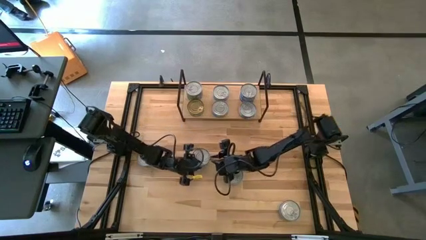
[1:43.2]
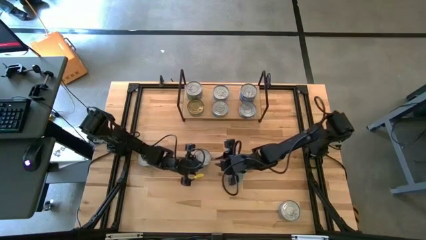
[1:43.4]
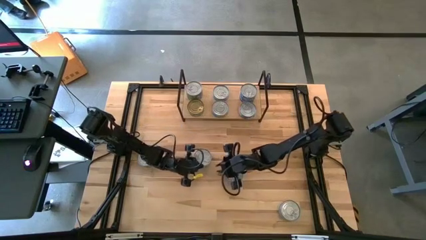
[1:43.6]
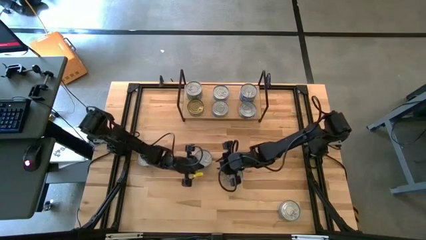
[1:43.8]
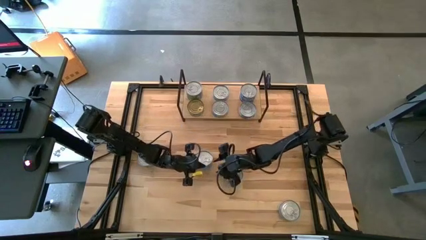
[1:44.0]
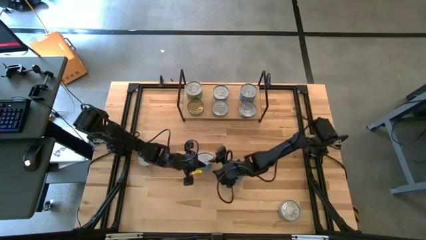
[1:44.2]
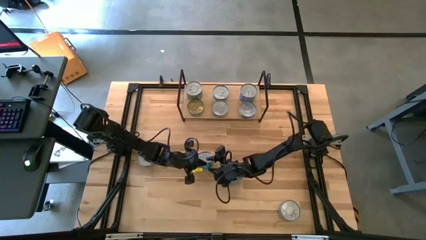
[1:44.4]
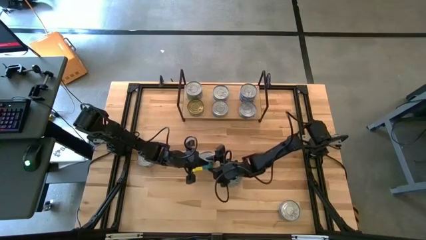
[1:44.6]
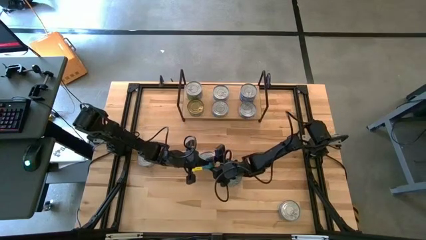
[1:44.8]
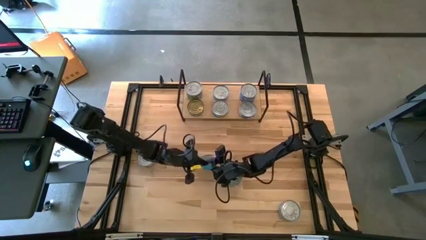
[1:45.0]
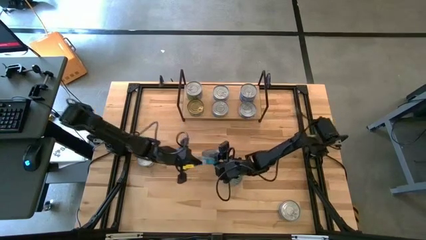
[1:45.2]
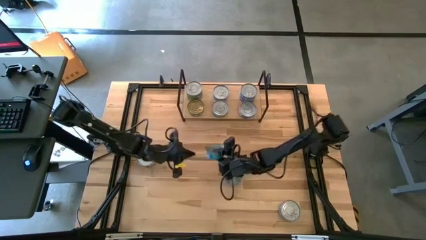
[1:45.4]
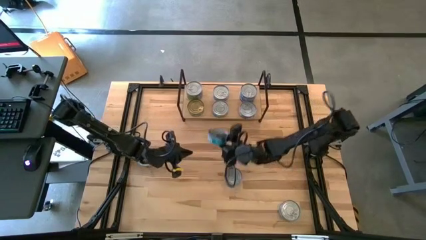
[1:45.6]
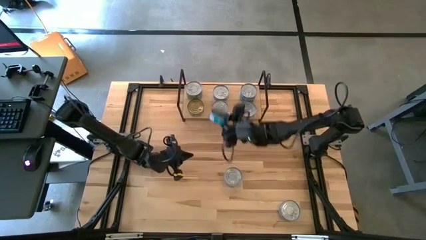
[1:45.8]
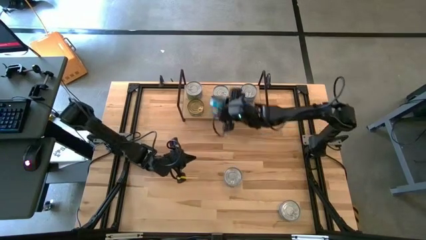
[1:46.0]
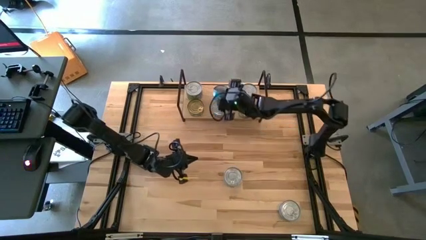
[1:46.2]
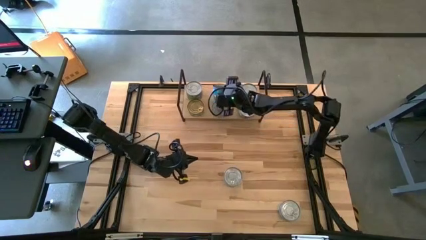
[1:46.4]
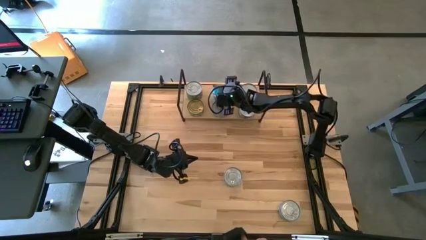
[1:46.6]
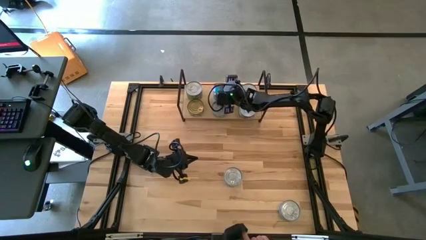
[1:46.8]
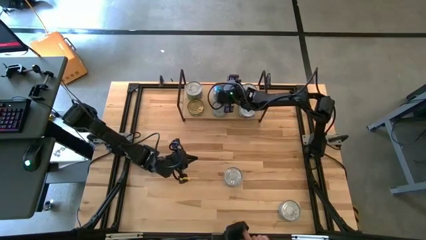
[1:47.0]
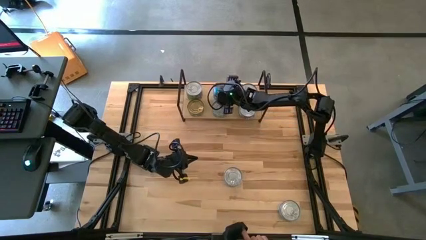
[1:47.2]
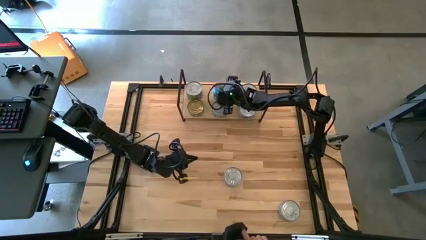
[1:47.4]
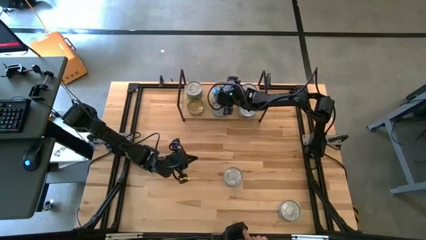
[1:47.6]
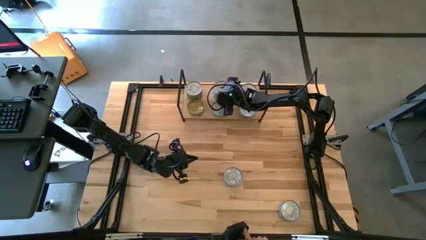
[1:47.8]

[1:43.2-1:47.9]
Task: Stack canned seafood by type on shelf
Stack the yellow and blue tuna can on top of the other yellow and blue tuna can on the shelf

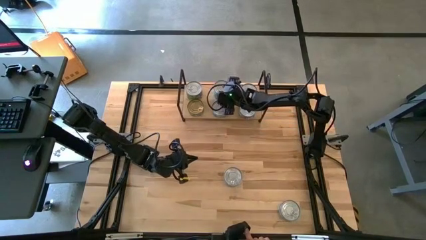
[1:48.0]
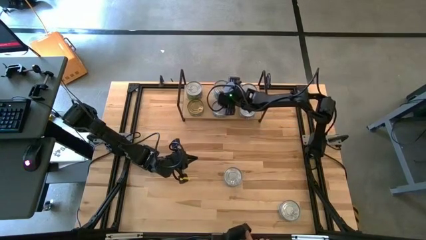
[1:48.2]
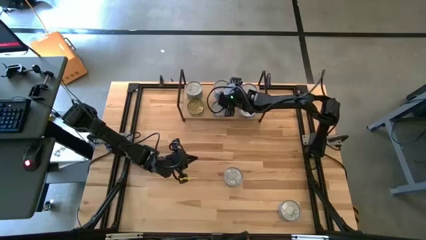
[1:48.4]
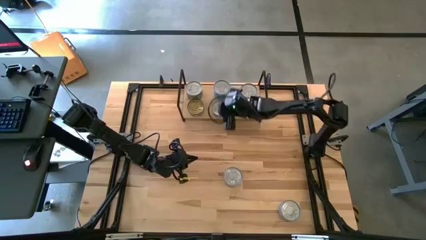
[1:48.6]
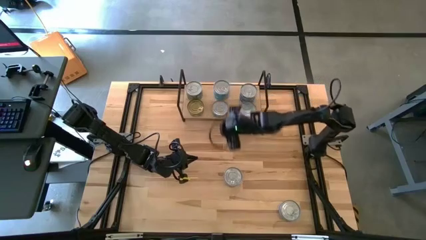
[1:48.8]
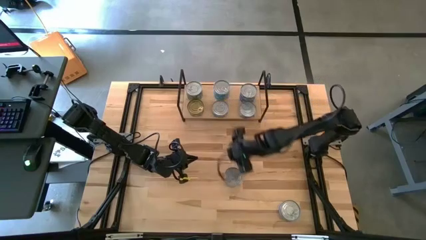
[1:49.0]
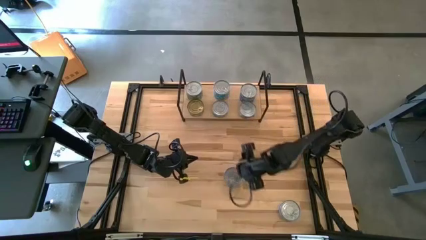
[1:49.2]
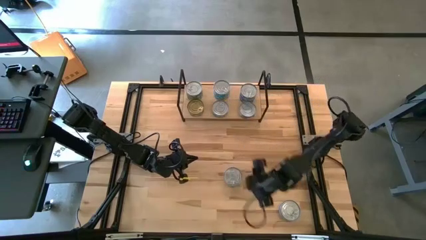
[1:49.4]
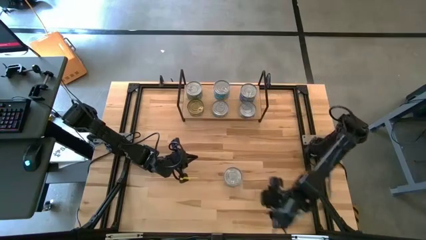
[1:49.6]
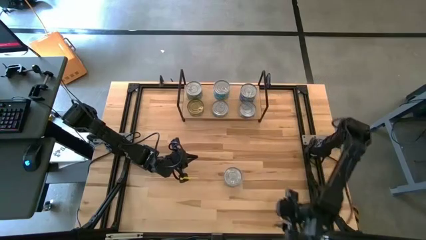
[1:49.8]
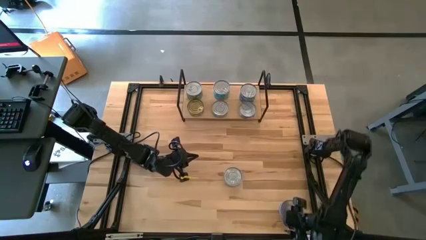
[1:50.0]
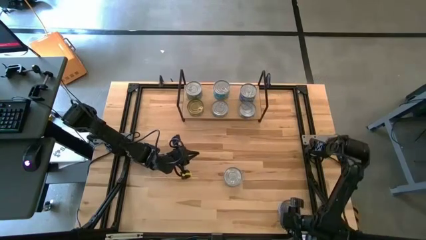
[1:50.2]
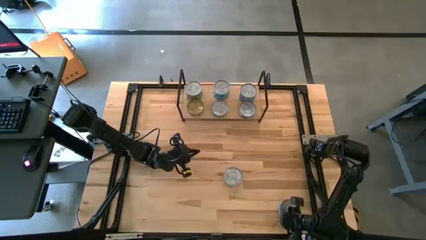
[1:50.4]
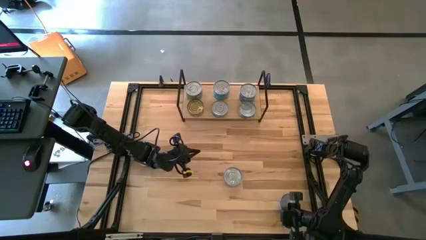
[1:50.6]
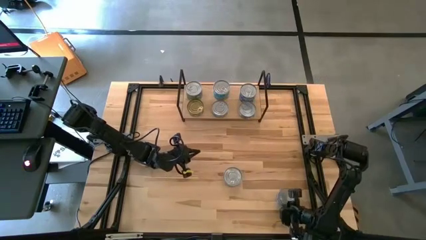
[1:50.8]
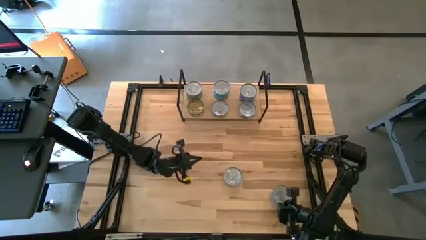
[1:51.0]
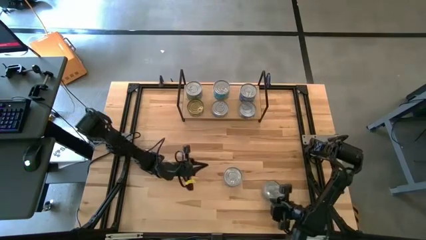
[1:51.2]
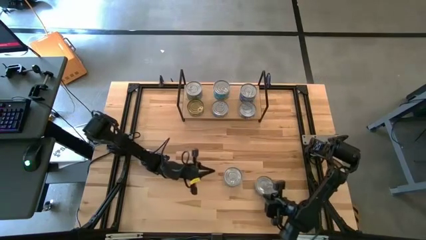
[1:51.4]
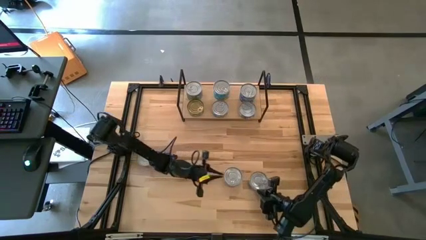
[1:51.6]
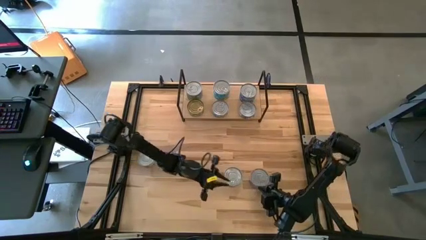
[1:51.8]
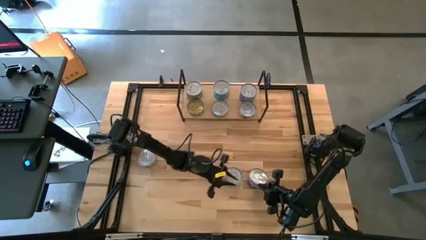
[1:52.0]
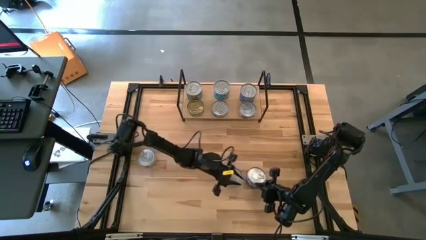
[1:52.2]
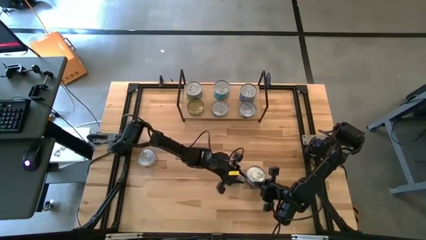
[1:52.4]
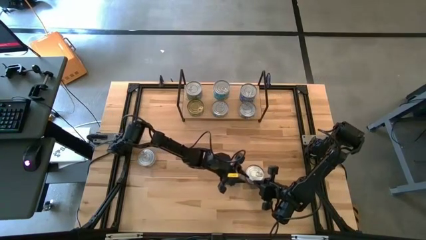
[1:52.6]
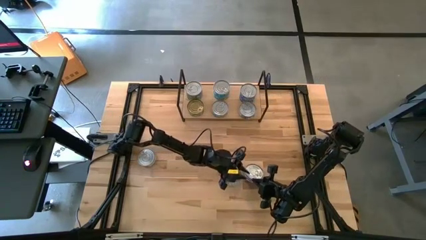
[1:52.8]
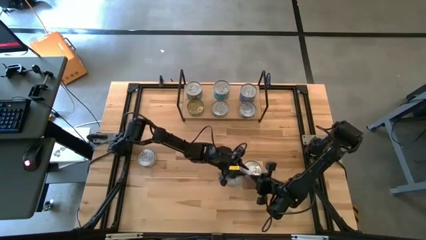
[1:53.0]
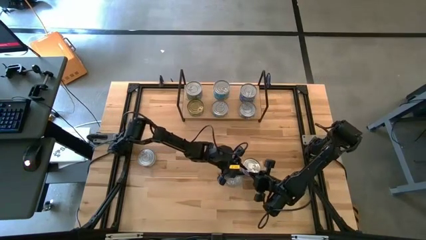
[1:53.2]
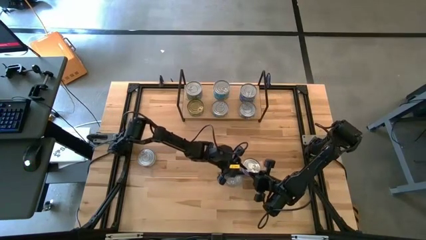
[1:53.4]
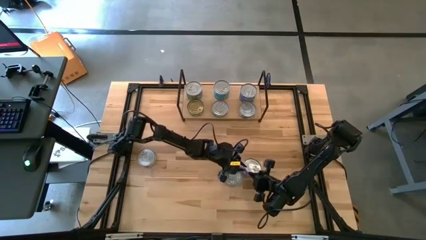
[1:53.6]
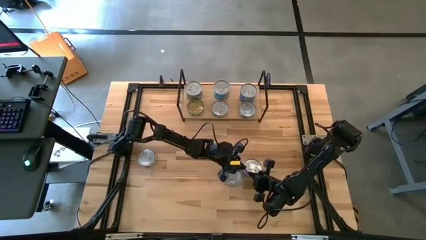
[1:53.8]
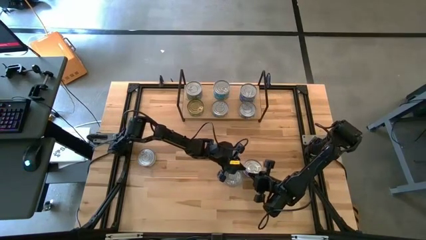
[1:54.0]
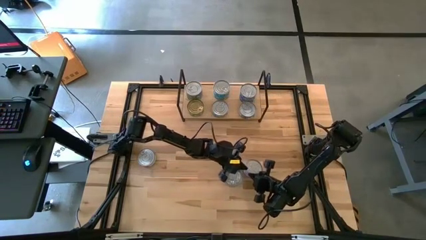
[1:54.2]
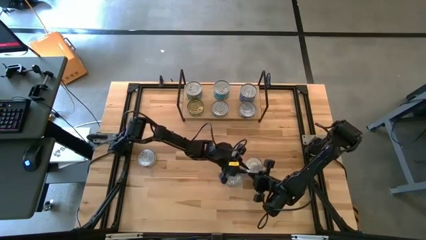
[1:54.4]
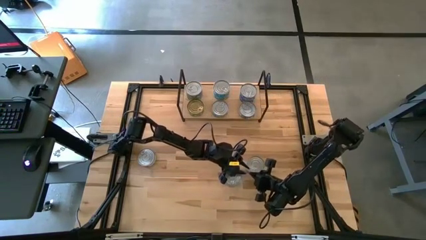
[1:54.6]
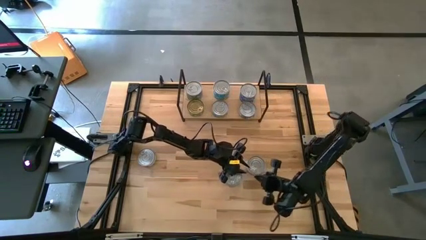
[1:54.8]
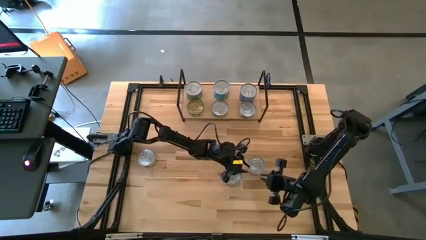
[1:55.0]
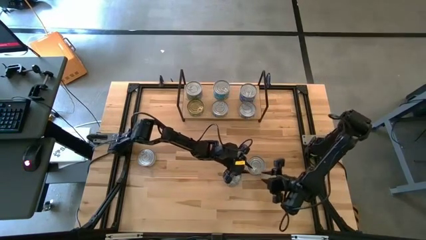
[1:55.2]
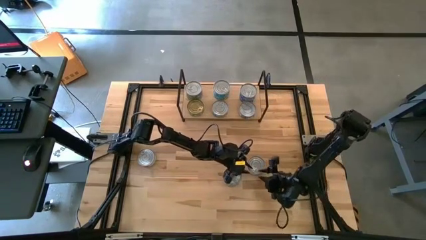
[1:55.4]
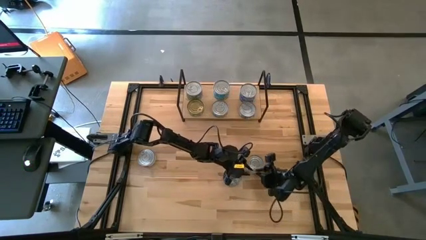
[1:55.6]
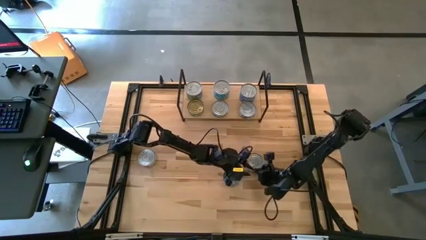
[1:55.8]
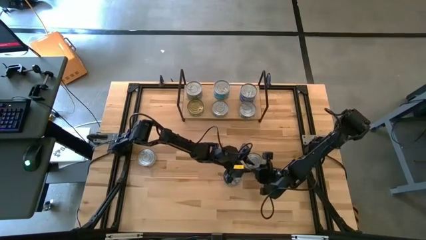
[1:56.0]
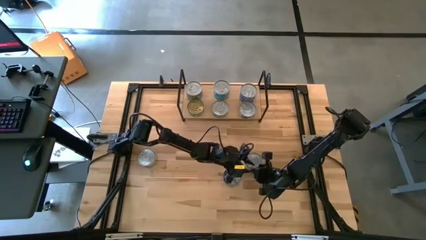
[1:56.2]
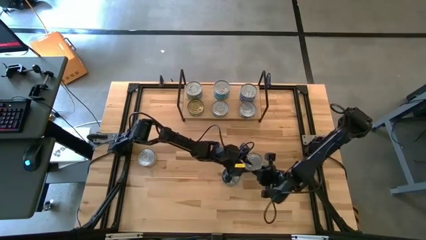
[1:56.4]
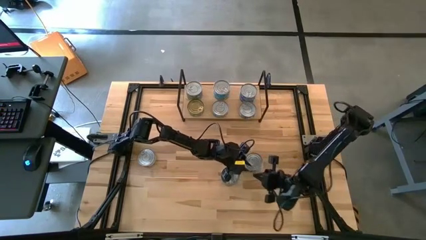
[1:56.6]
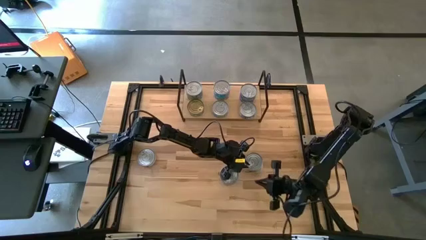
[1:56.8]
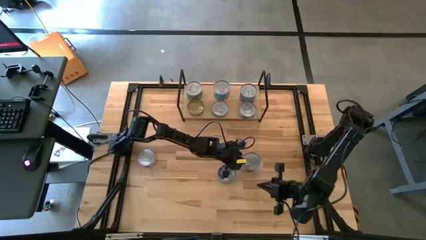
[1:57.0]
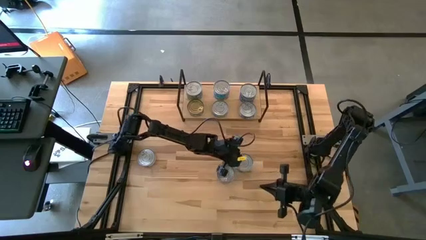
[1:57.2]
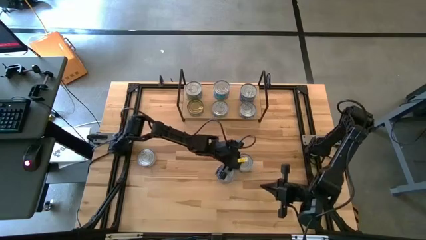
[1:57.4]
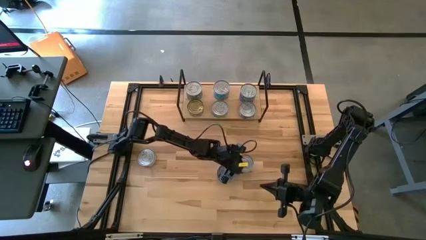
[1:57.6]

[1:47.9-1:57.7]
Stack the blue tuna can on top of the other blue tuna can on the shelf
